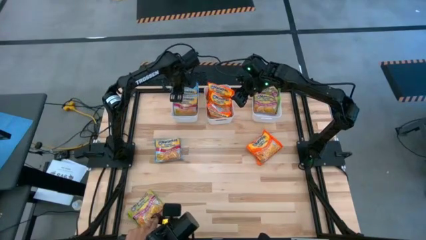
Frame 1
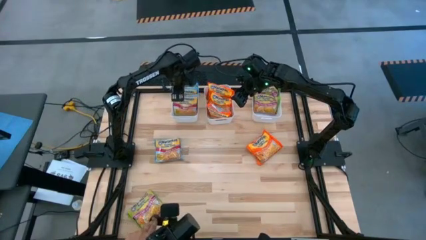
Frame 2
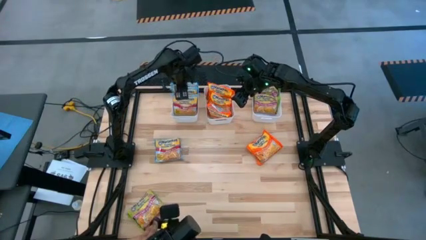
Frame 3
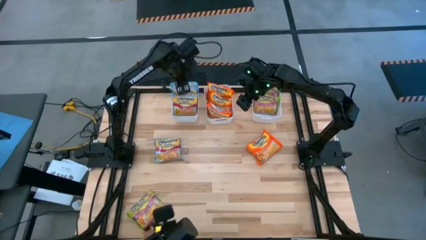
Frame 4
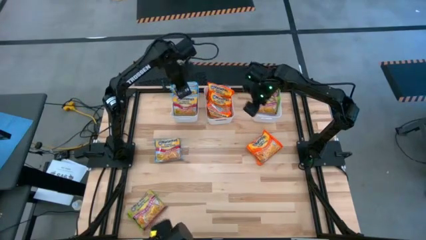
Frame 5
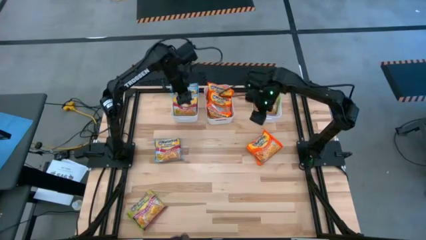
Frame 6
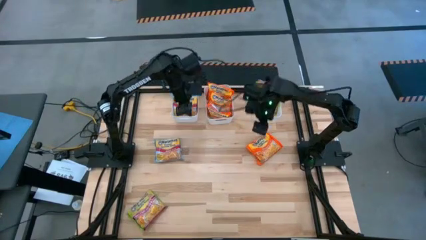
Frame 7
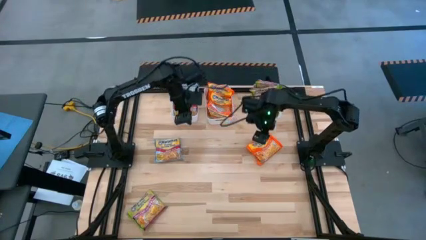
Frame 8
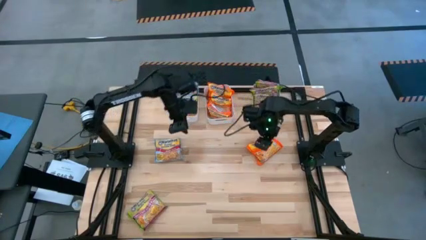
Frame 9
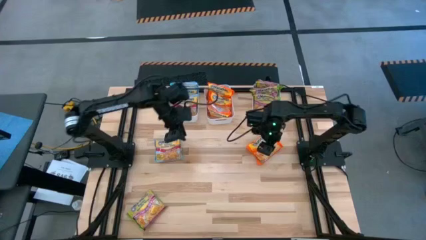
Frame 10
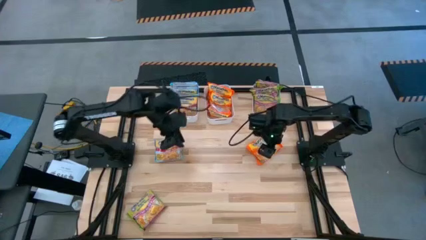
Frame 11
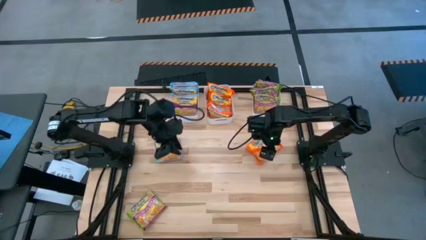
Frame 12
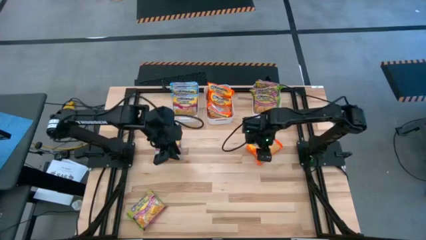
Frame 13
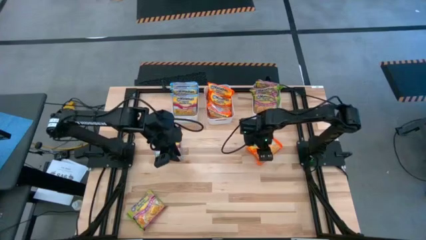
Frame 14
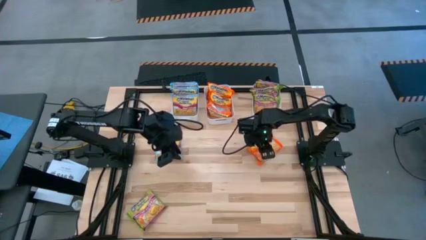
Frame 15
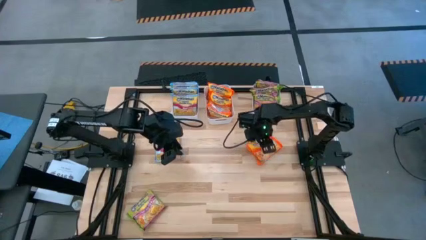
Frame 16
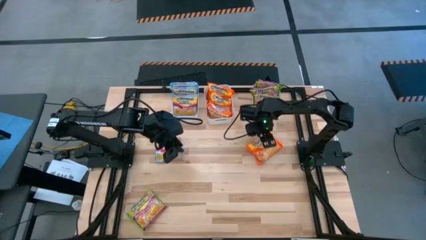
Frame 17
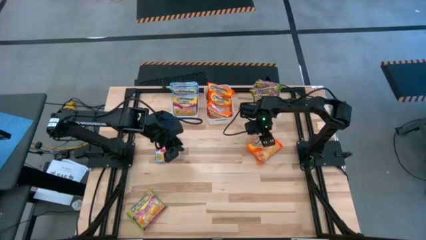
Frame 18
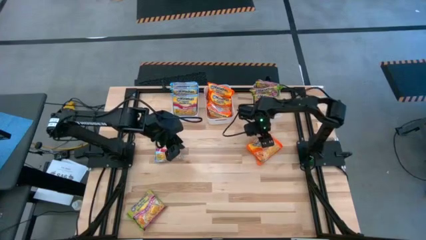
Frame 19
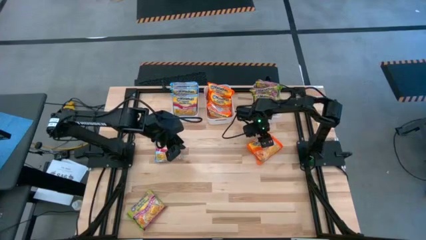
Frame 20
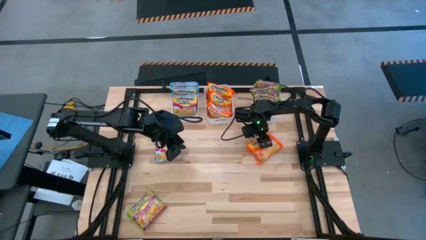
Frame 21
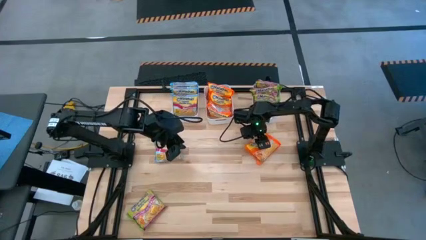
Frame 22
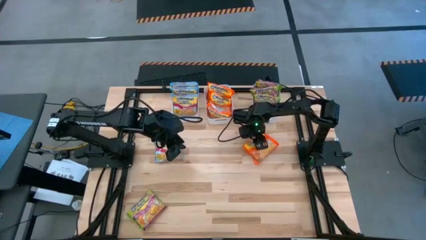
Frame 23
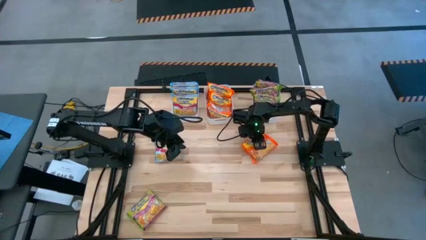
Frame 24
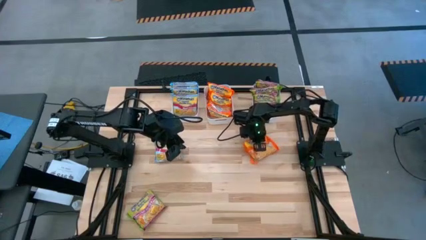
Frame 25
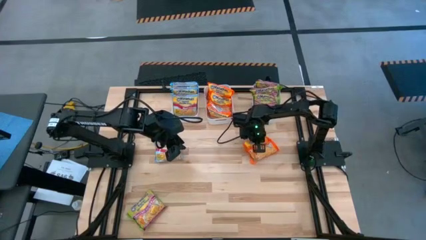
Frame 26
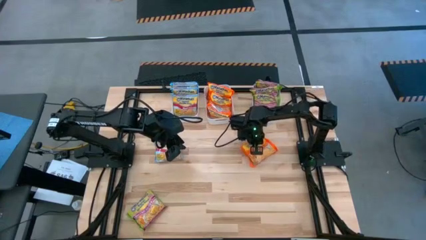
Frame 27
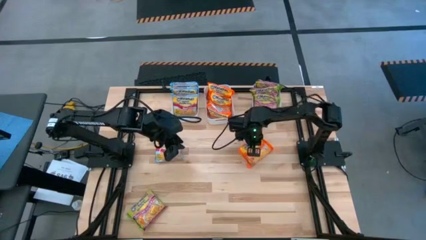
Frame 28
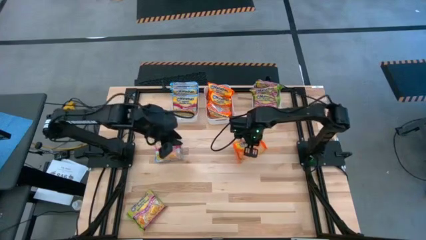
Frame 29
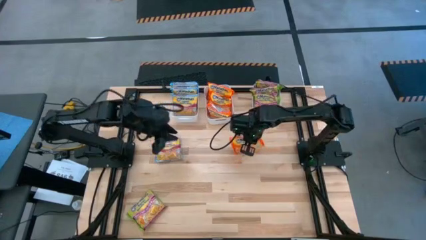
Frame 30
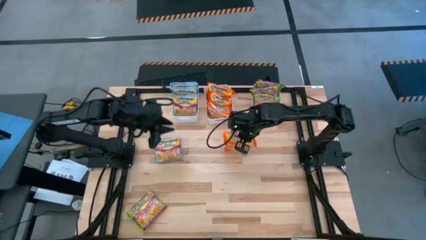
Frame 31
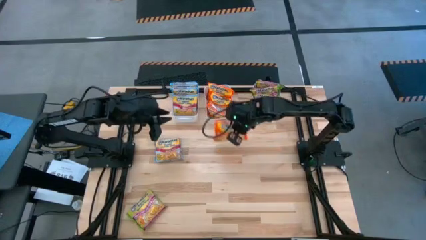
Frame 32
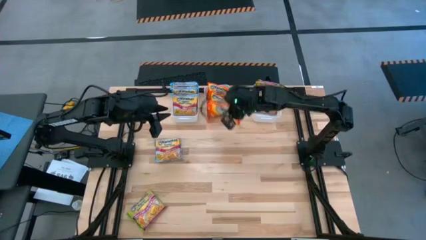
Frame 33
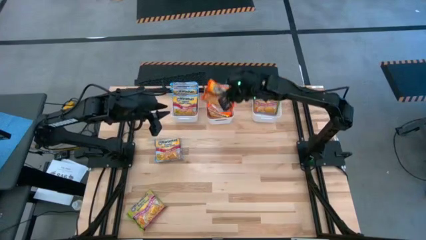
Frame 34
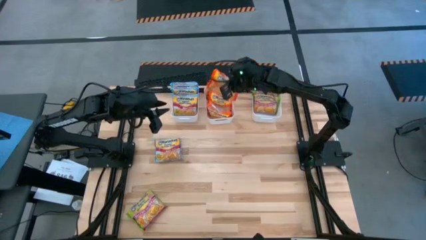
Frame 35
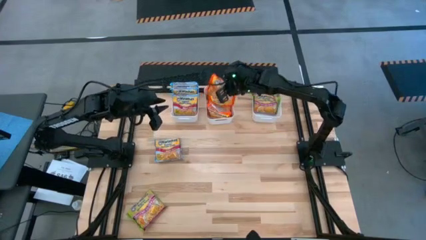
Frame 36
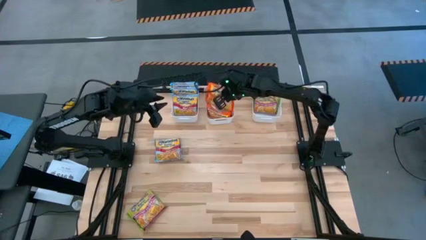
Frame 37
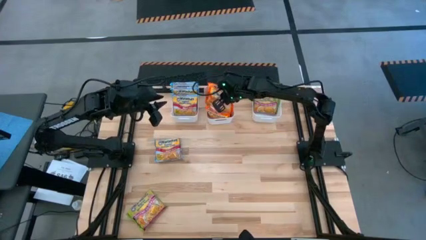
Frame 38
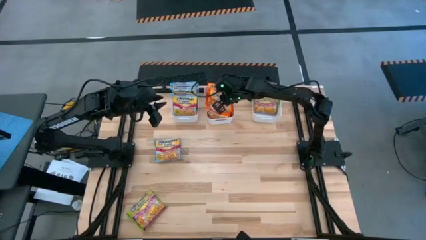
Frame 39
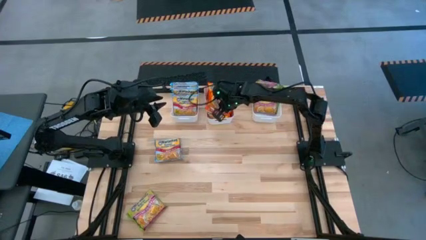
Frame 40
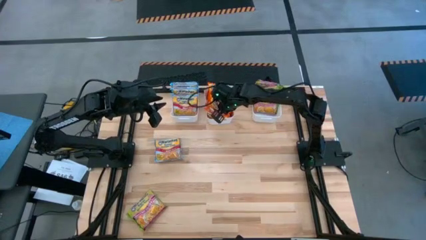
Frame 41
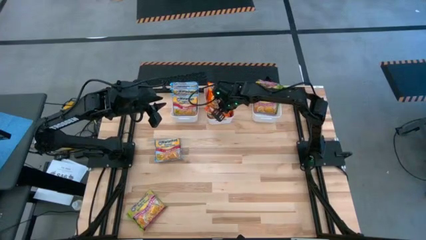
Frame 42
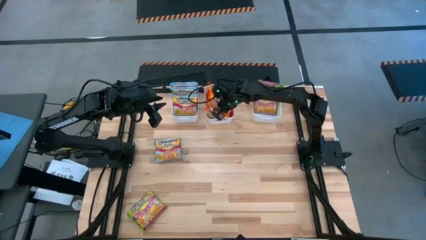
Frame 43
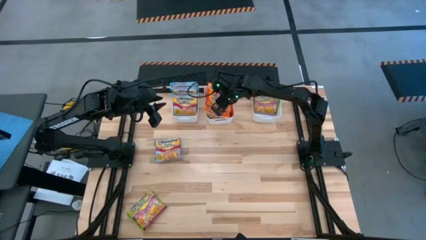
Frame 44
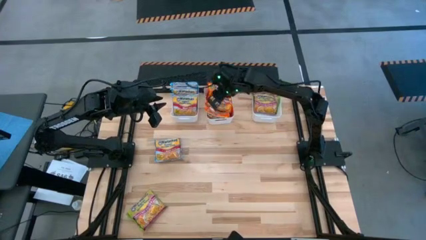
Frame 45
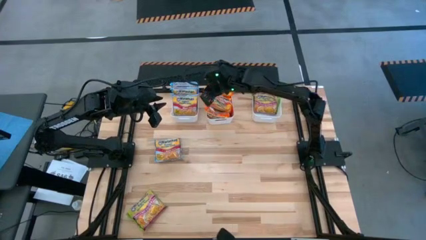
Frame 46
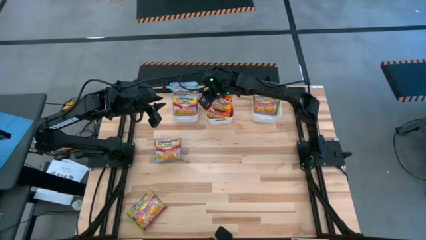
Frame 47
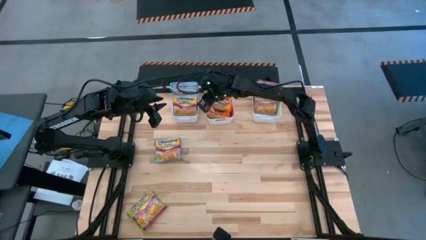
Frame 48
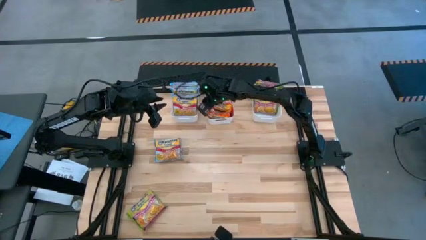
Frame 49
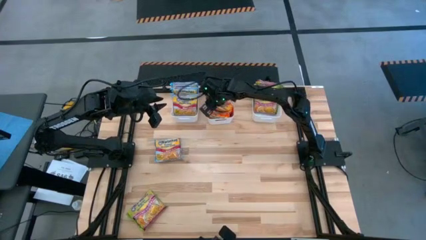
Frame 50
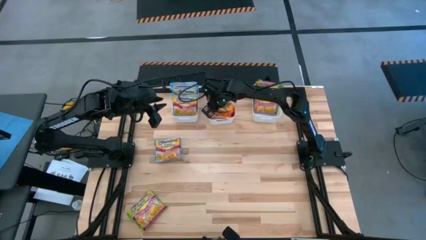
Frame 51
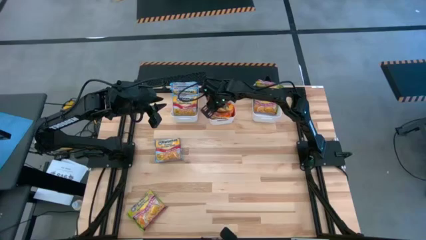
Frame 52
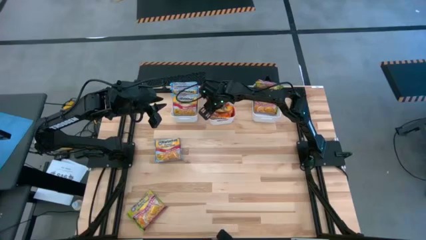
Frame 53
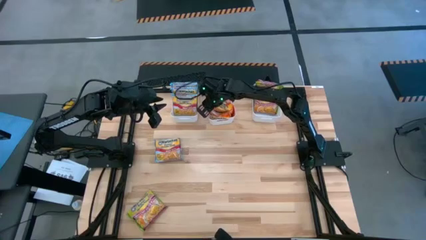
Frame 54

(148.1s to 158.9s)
Task: Sort Maruchan noodles
Put the orange noodle pack into the middle white bin

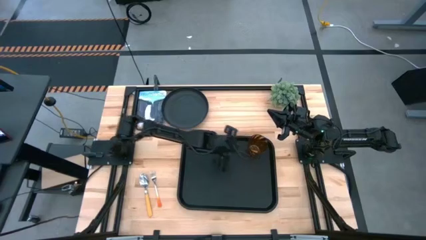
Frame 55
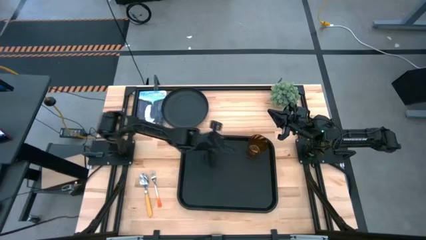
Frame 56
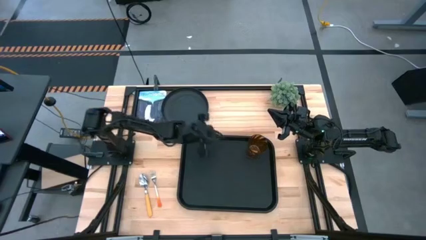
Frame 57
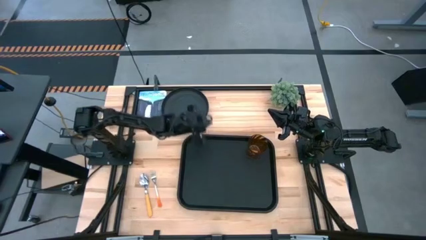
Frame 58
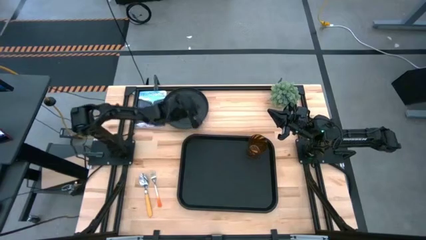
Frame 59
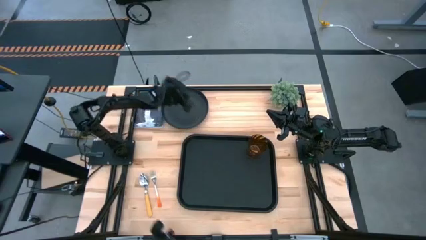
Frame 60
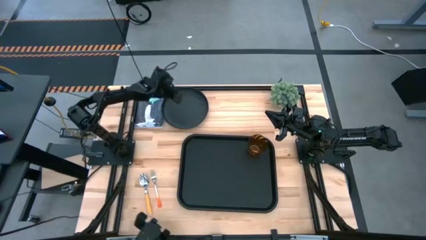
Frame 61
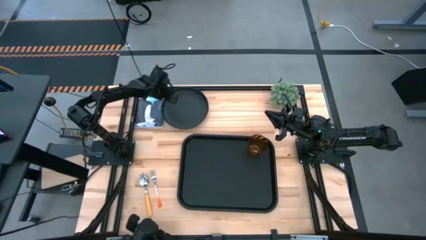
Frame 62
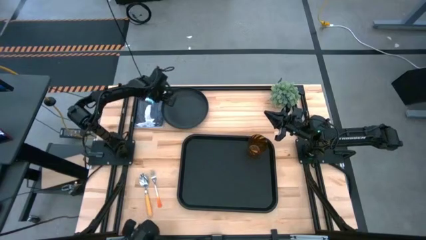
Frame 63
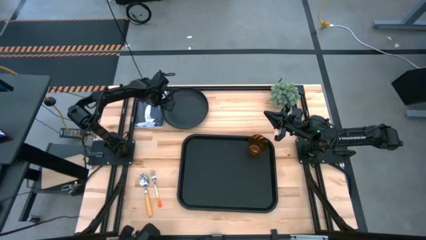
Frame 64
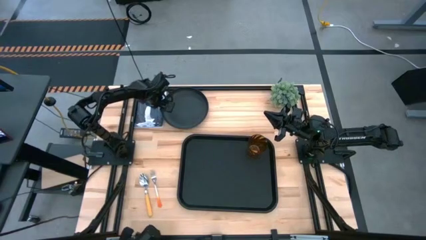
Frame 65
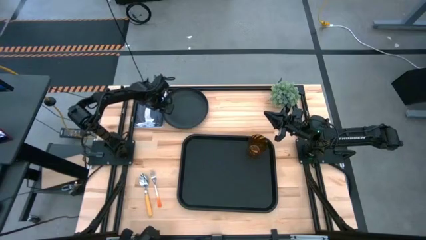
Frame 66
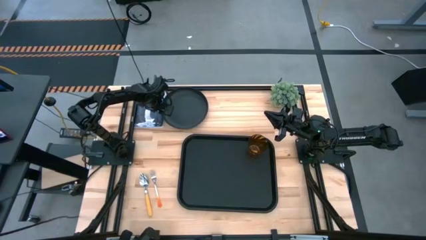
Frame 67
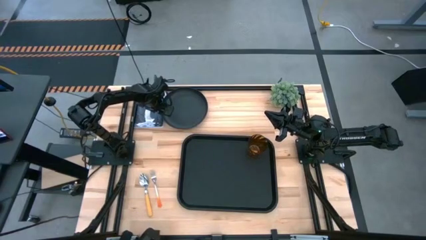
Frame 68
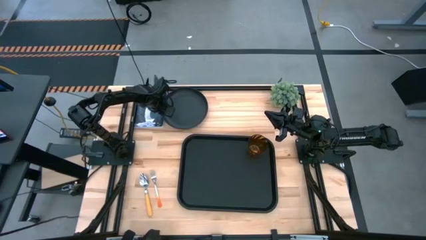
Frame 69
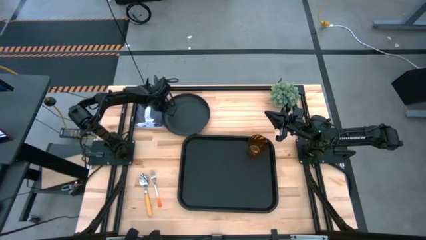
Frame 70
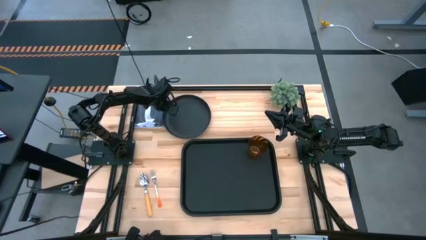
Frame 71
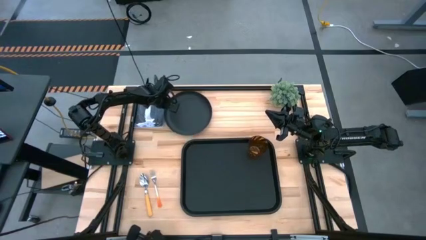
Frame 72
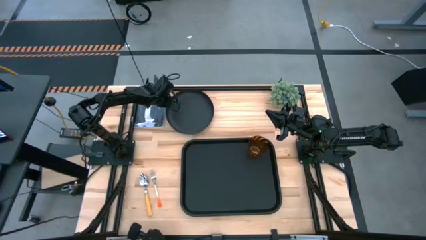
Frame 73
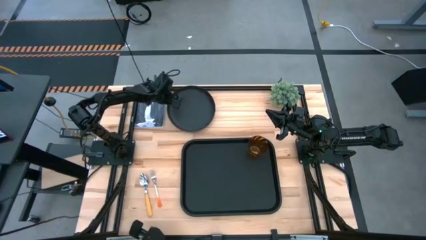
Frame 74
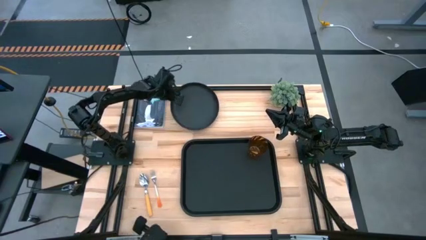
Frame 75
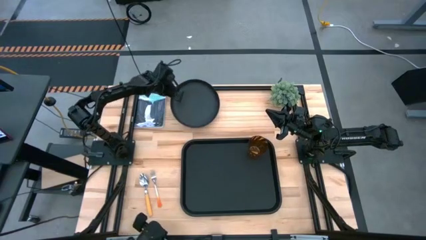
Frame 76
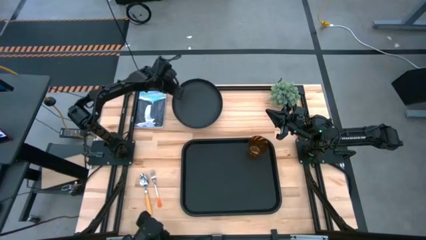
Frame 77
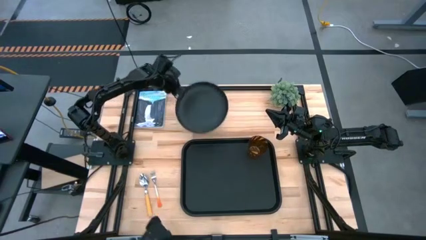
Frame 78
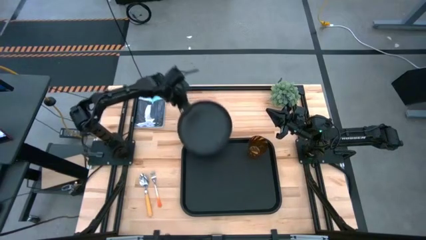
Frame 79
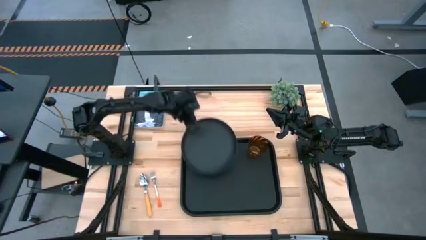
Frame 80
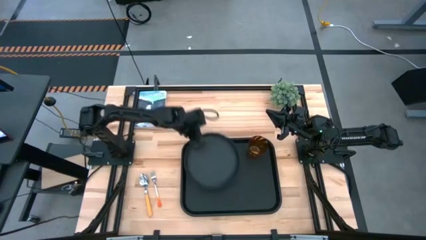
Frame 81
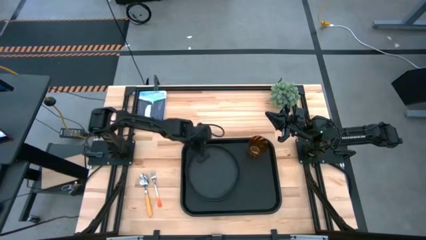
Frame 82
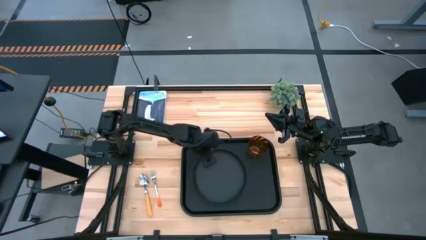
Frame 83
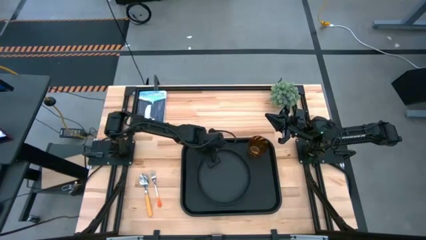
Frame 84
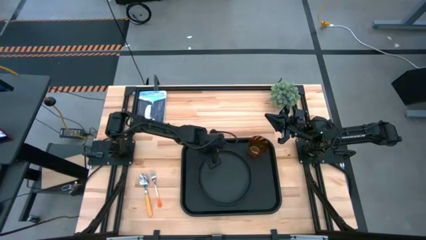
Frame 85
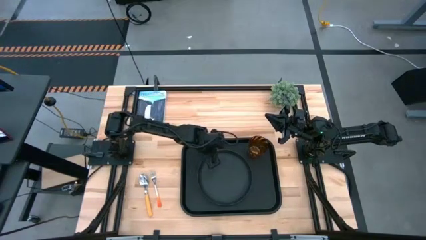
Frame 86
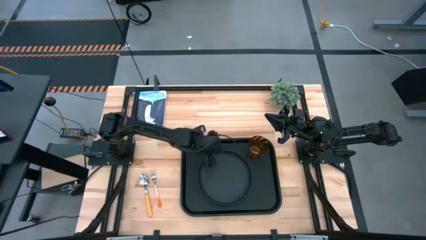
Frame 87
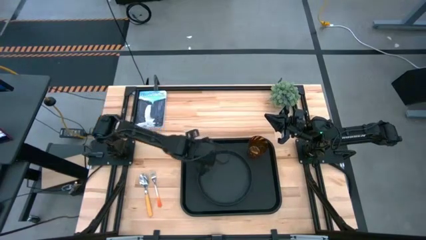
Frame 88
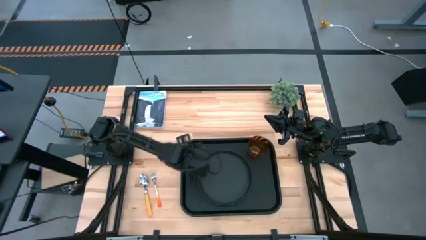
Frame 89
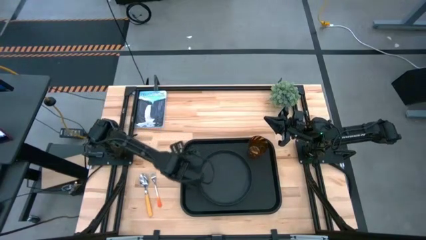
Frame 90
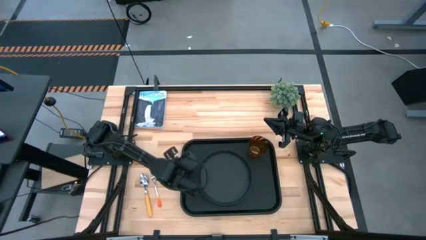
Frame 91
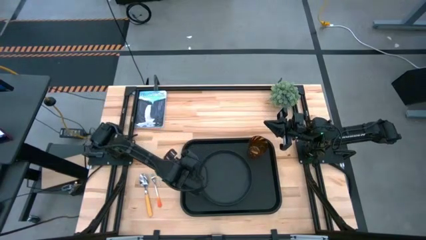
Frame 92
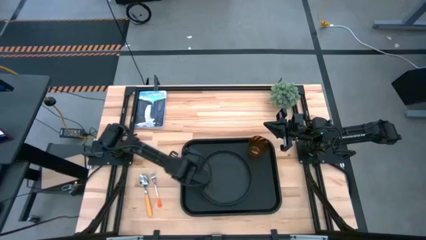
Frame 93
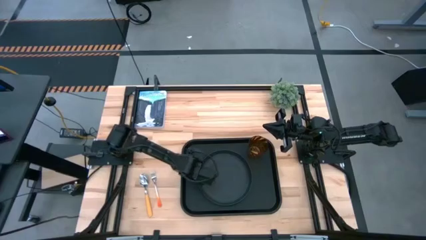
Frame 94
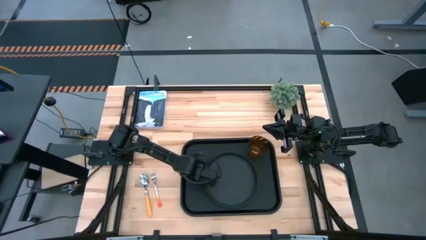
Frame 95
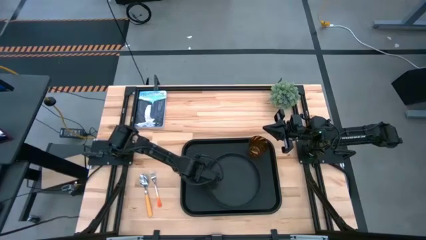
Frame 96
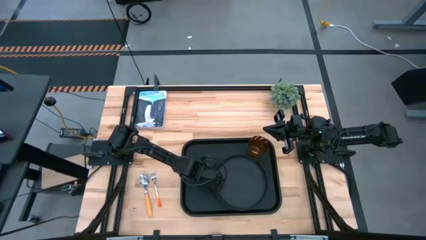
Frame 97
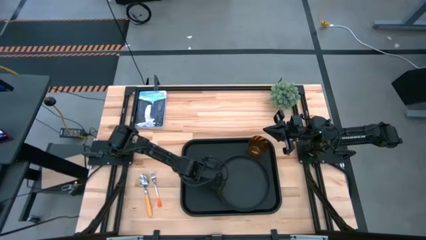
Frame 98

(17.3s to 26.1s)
Task: Pick and place plate/cup/fork/spoon on tray
Put the black plate on the bottom right of the black serving tray
